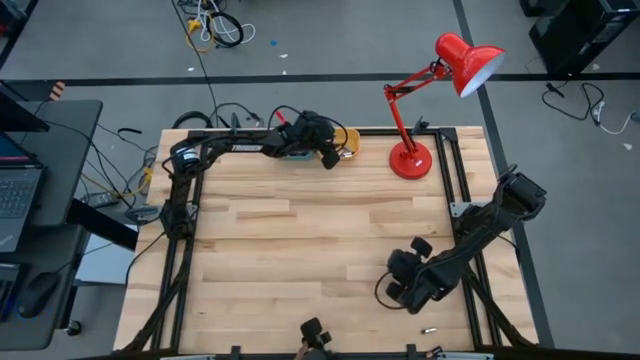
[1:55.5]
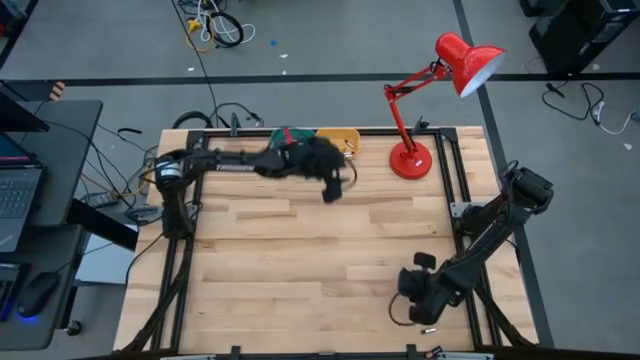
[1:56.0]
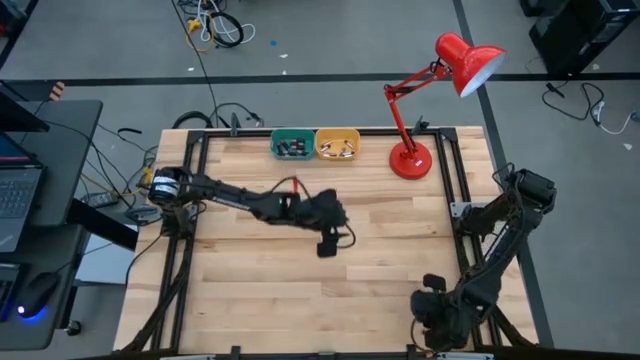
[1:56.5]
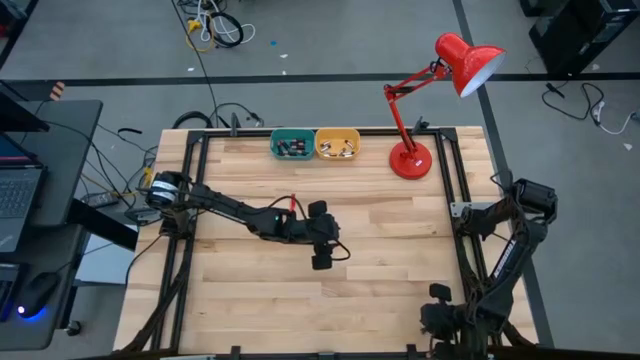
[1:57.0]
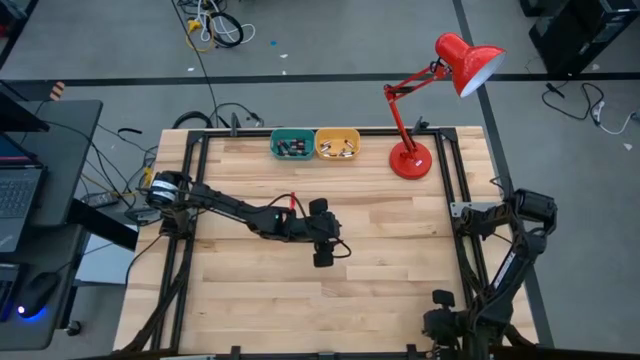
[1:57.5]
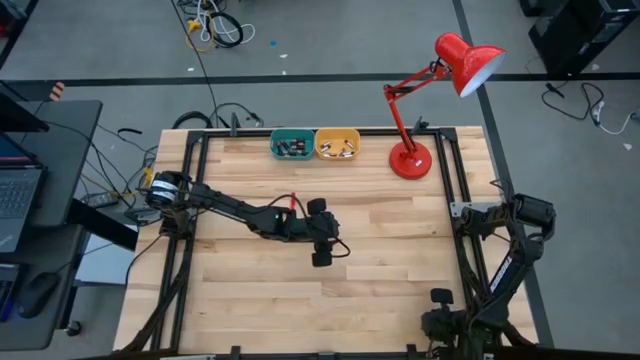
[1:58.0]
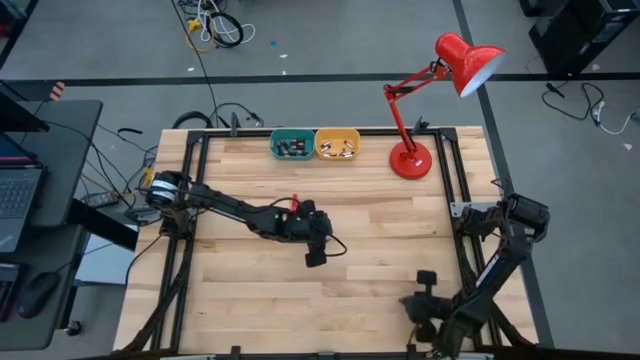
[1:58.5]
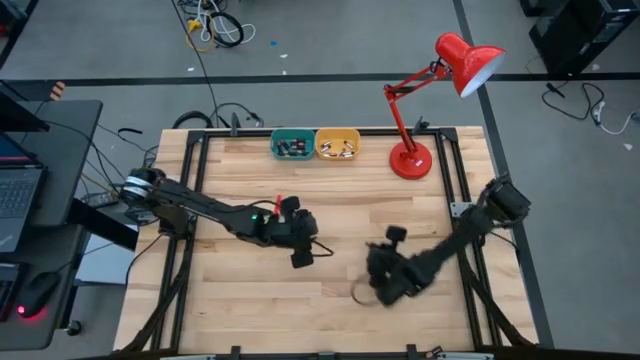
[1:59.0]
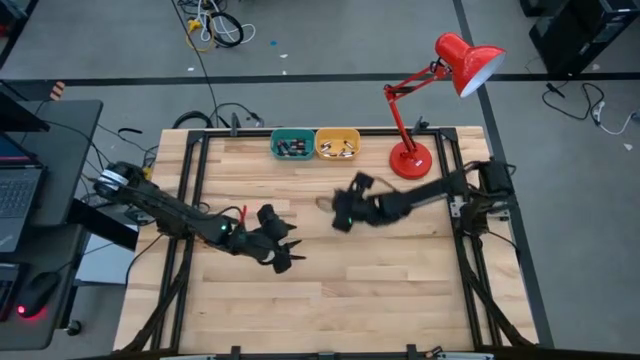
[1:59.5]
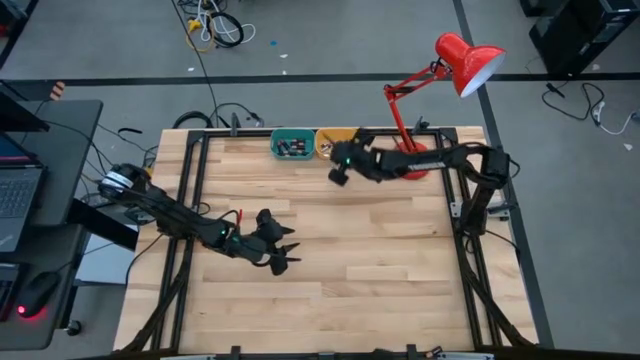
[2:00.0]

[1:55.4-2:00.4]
Task: Sort batteries
Put the white battery into the yellow bin

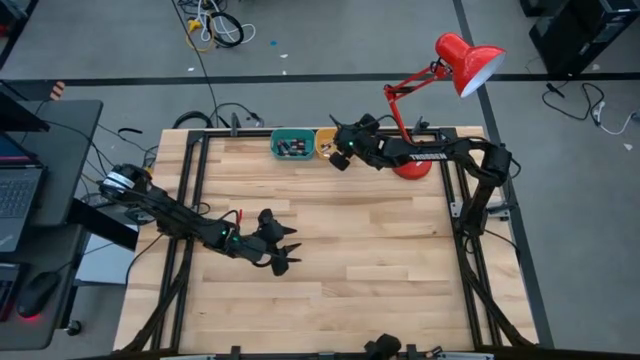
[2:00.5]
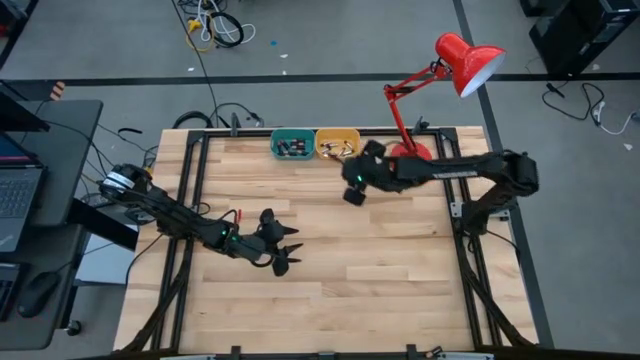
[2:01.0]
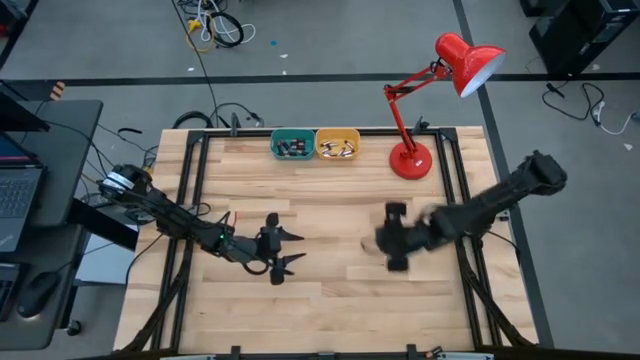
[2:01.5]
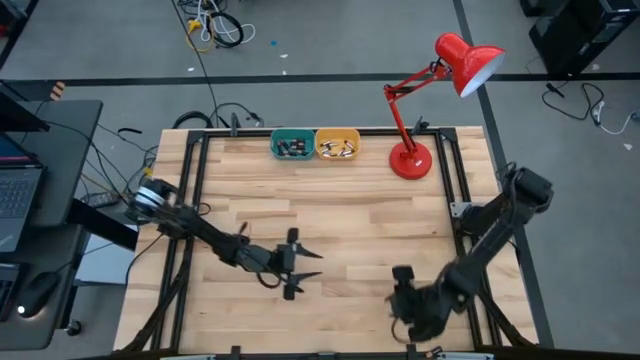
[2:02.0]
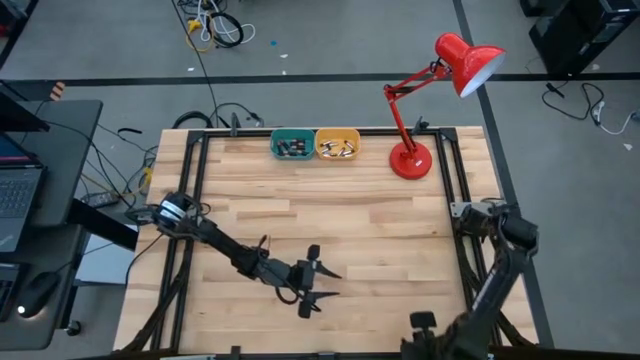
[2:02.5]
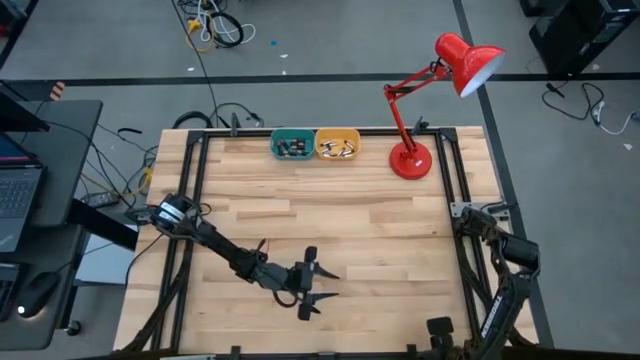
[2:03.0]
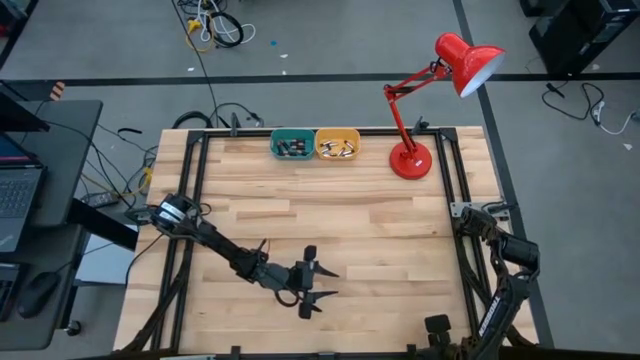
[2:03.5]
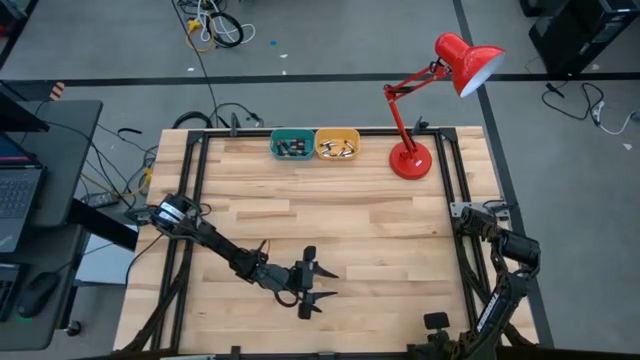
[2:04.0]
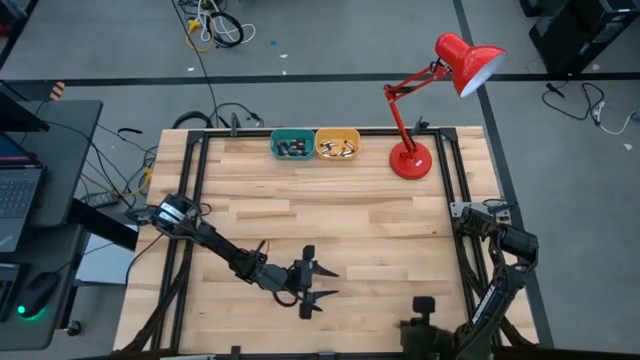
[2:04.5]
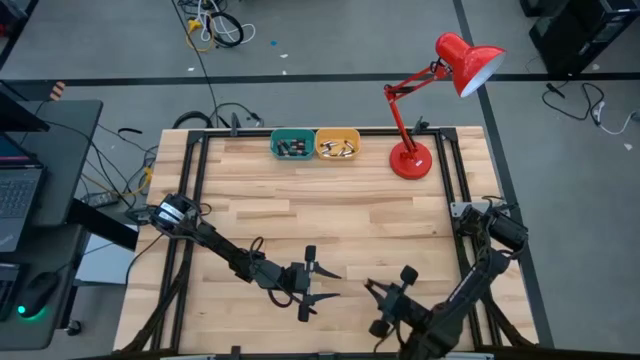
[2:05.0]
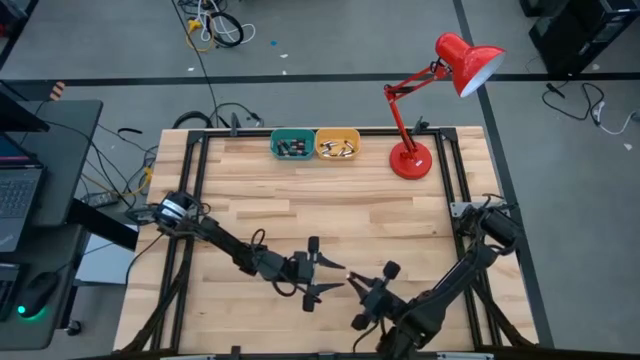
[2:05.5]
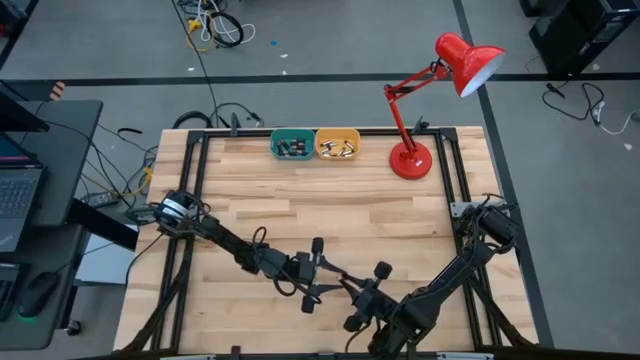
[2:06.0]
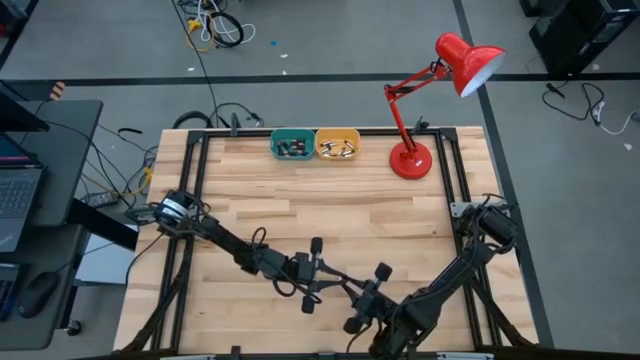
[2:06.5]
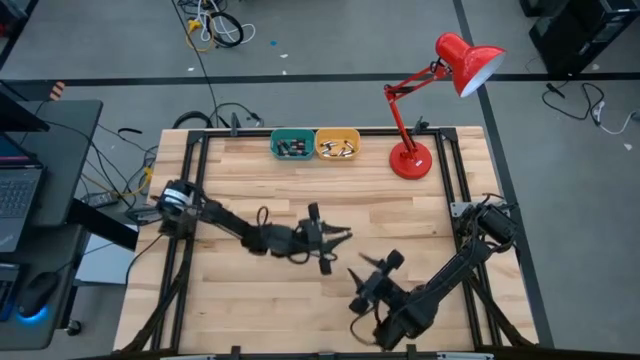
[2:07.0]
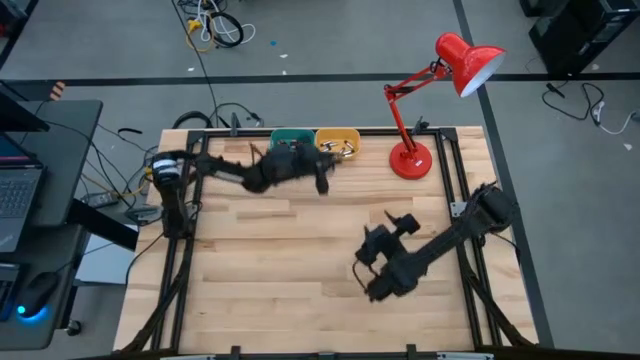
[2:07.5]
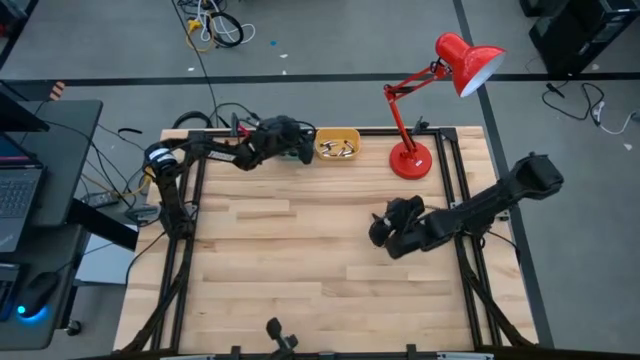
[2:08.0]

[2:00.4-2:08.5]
Put the black battery into the blue bin

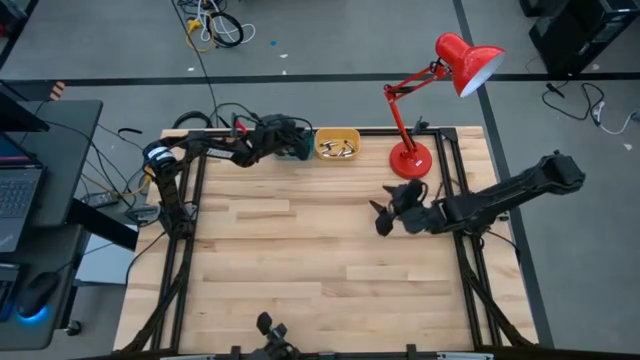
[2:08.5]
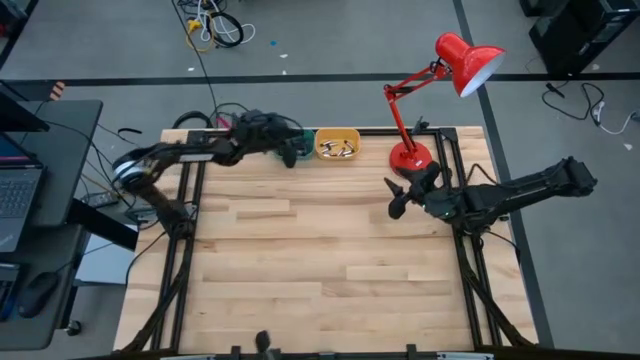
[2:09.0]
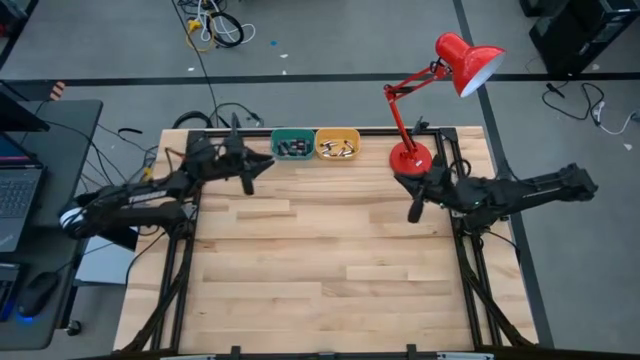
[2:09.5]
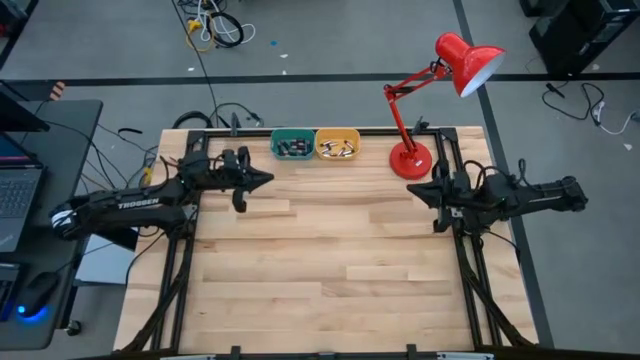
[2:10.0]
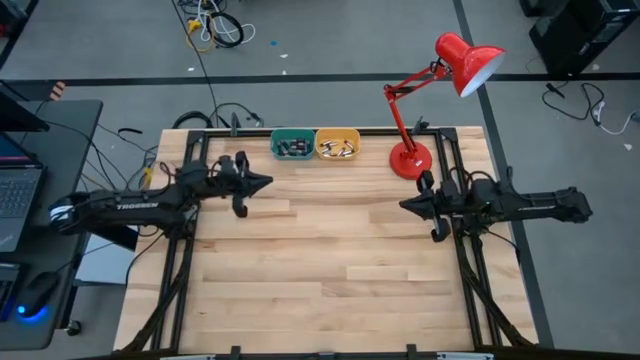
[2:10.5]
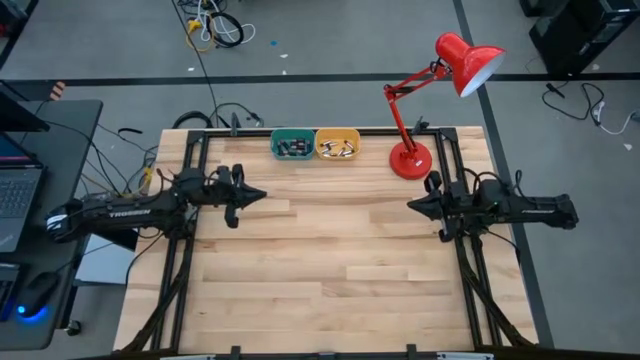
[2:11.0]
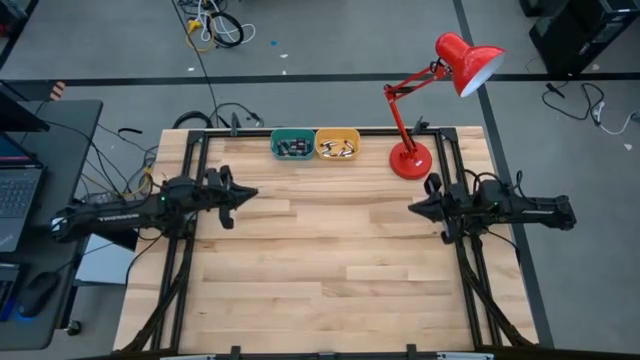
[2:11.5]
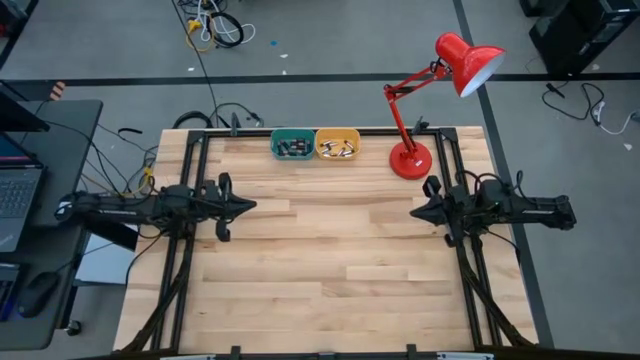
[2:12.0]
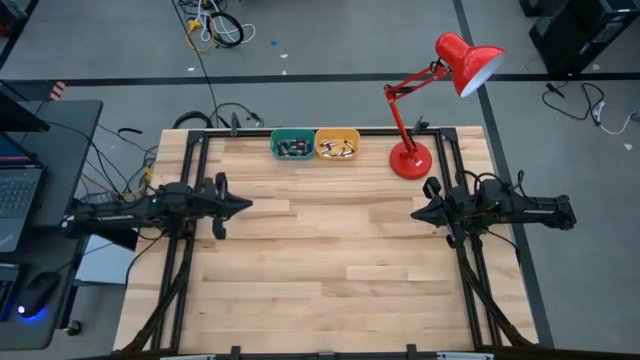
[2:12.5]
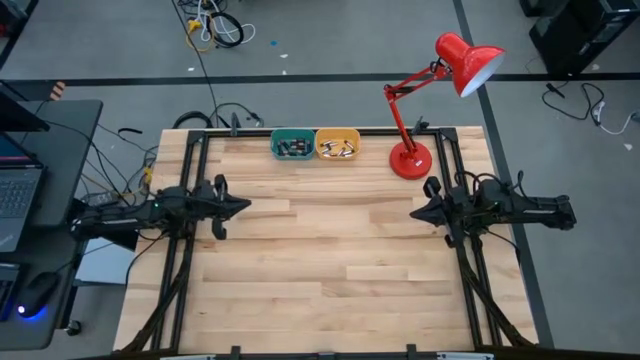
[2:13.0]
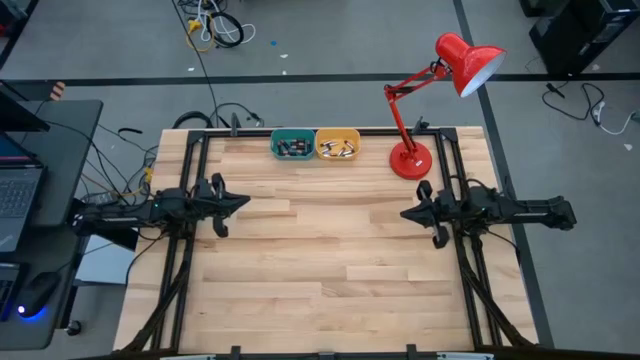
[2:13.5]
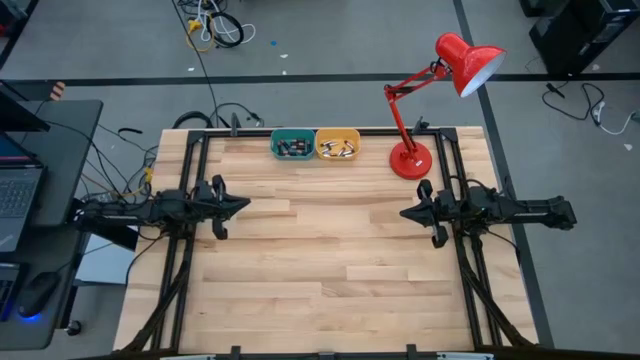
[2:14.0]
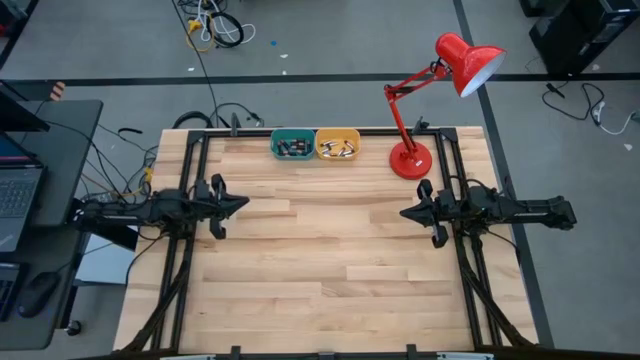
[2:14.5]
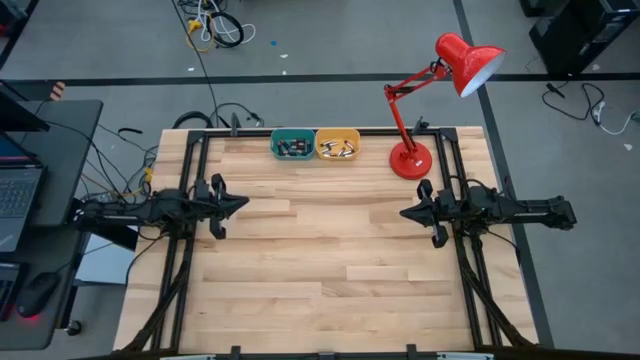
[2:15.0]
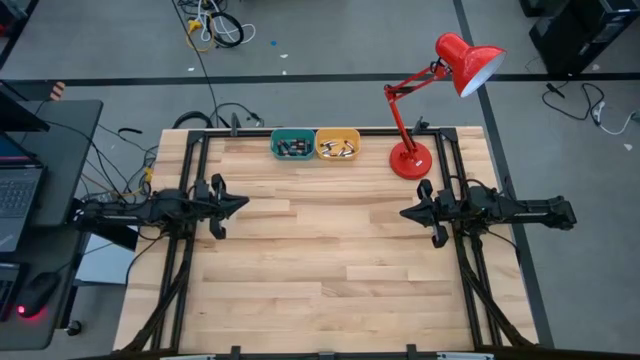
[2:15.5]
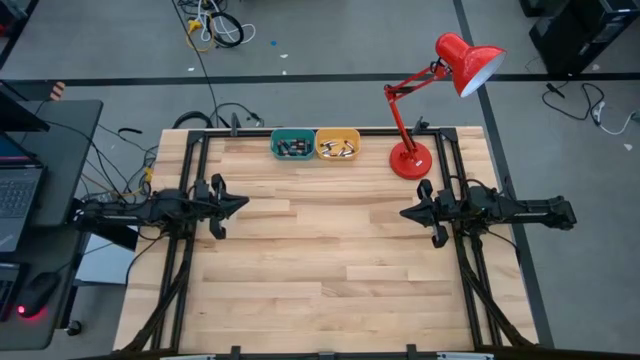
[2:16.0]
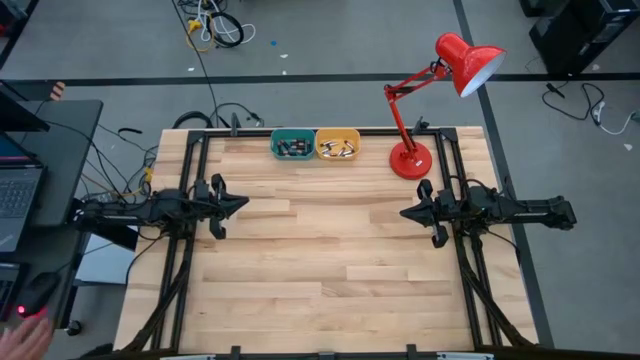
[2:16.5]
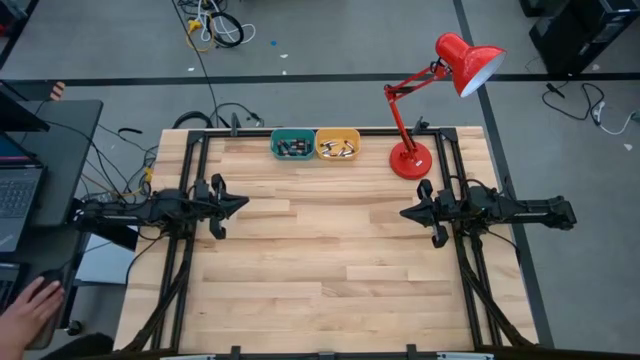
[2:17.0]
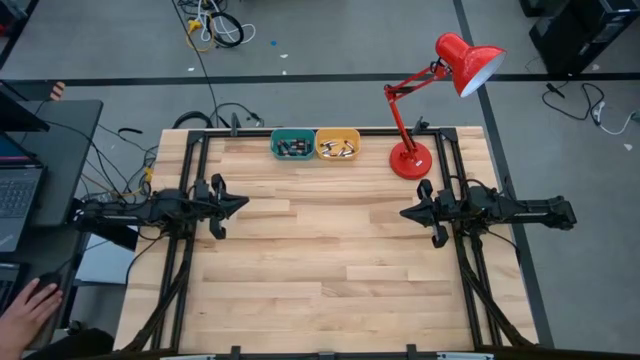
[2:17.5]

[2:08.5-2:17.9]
Return to Home Position
